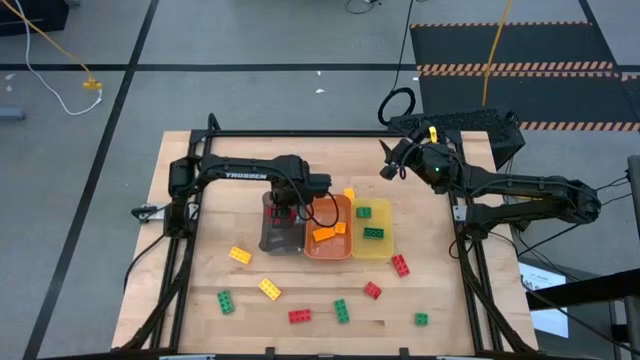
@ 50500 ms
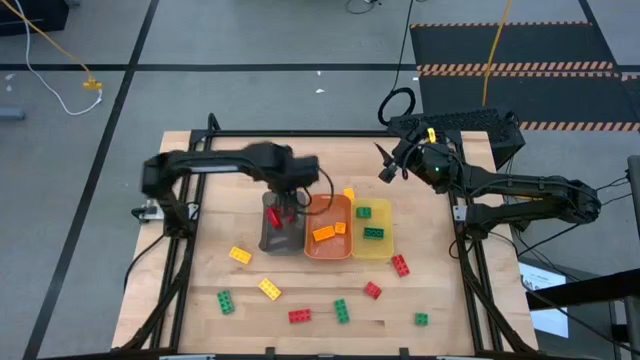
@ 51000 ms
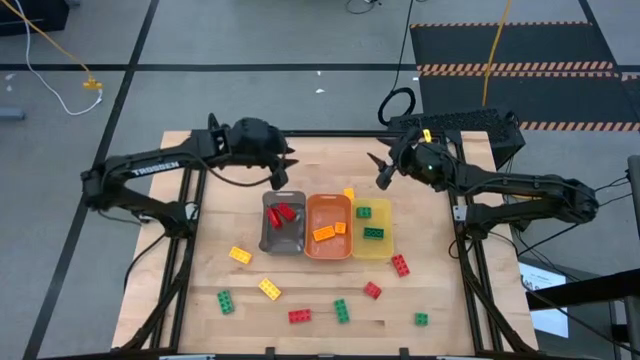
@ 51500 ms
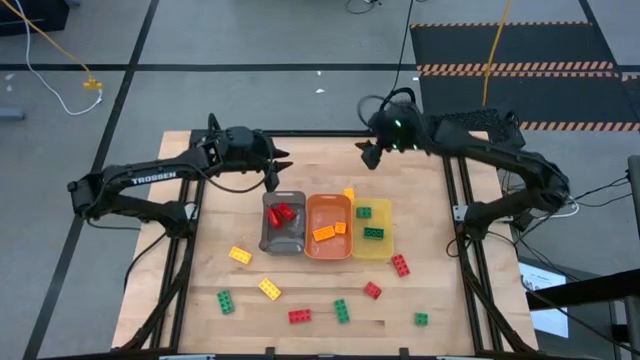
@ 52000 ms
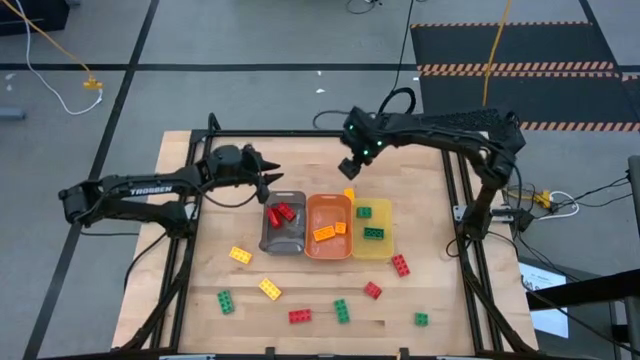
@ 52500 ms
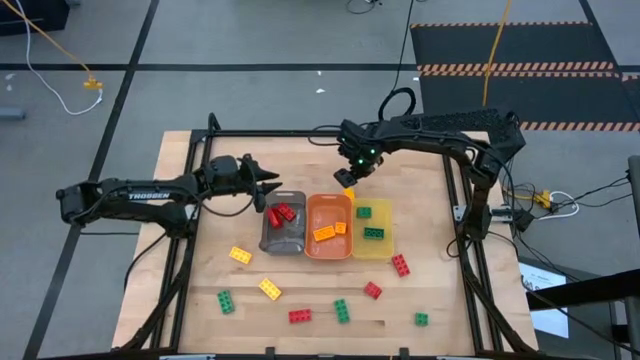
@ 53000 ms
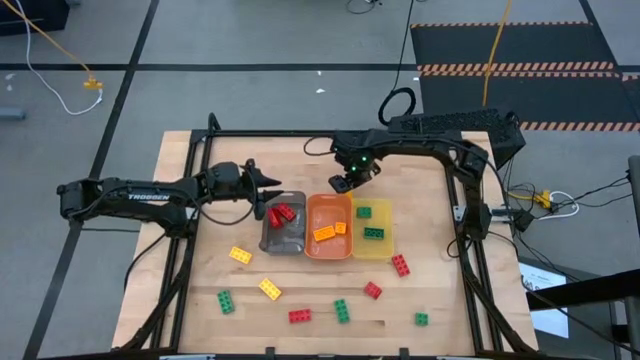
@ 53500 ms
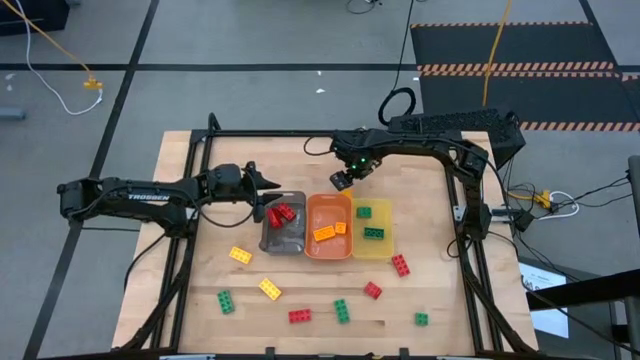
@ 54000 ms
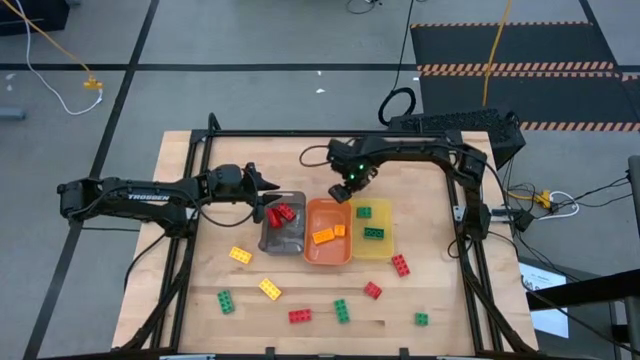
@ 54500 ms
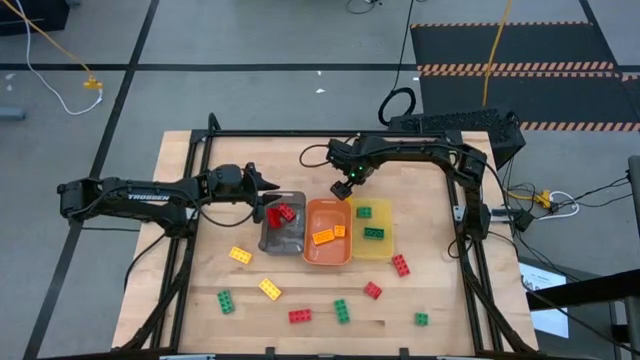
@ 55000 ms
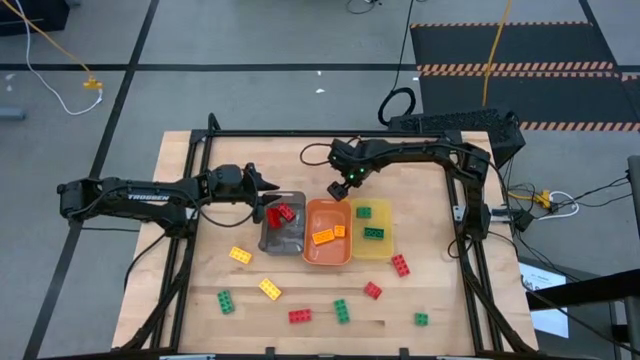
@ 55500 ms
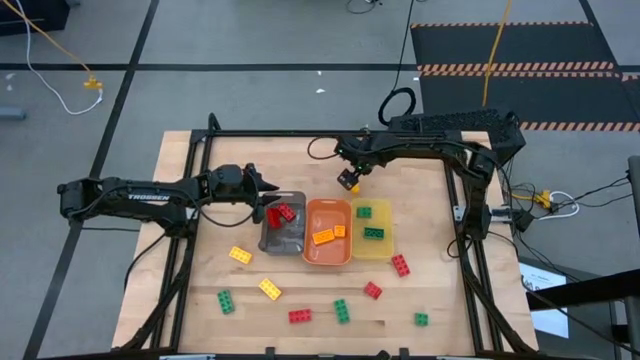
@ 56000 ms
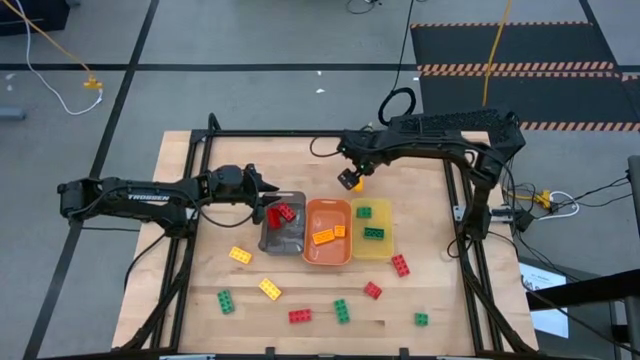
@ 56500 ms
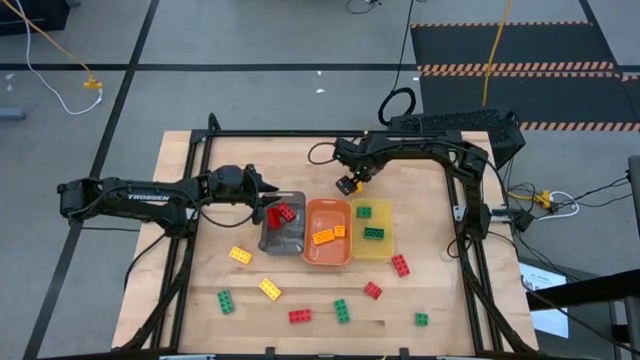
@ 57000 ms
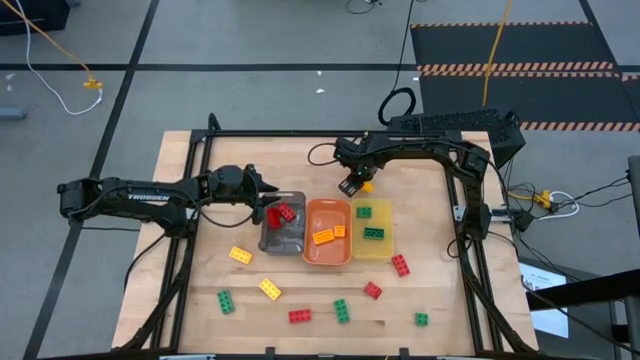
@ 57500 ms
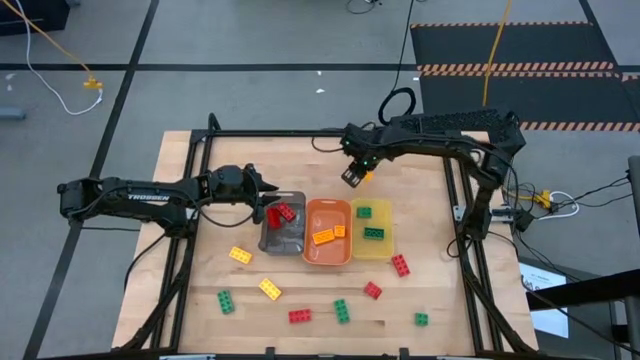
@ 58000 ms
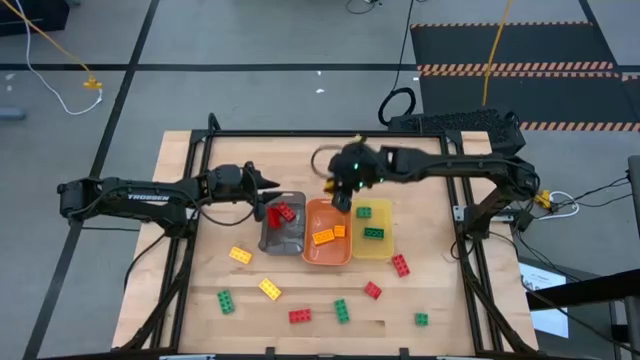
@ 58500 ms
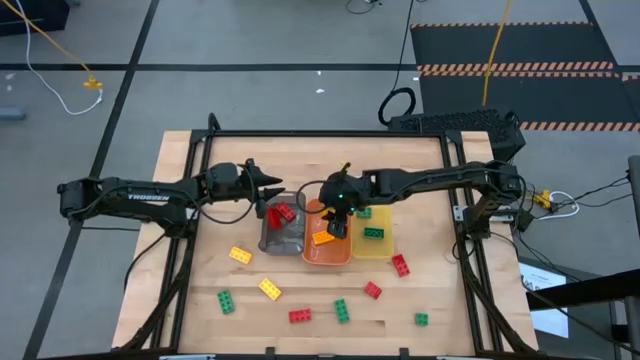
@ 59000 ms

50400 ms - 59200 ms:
Task: Sort & place blocks by color
Put the yellow game piece into the orange bin

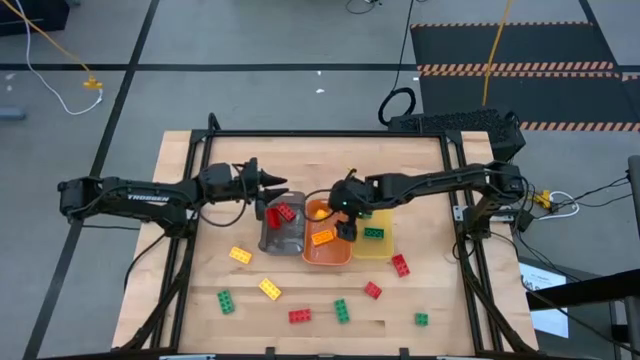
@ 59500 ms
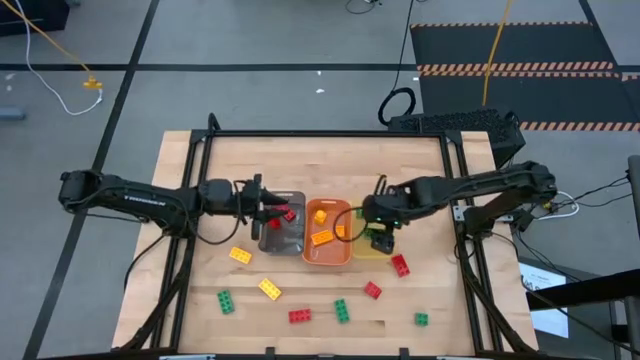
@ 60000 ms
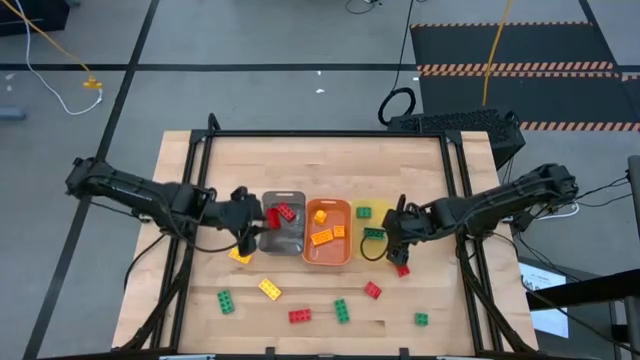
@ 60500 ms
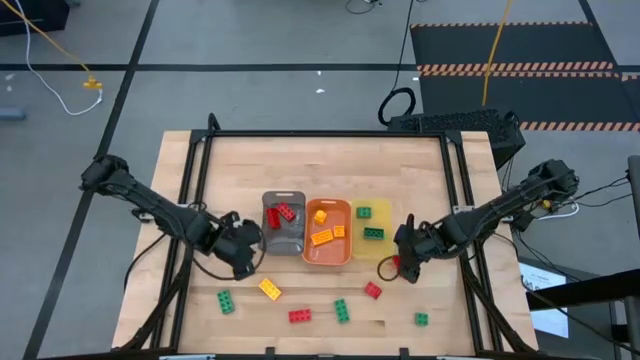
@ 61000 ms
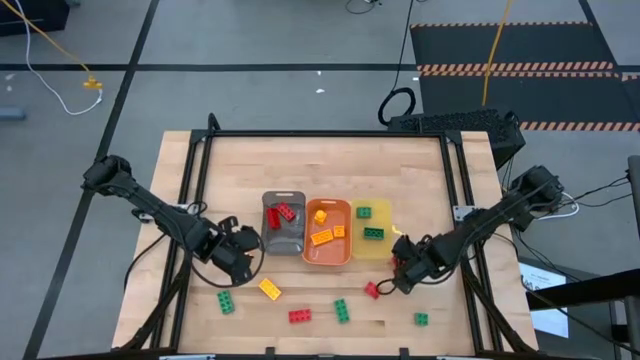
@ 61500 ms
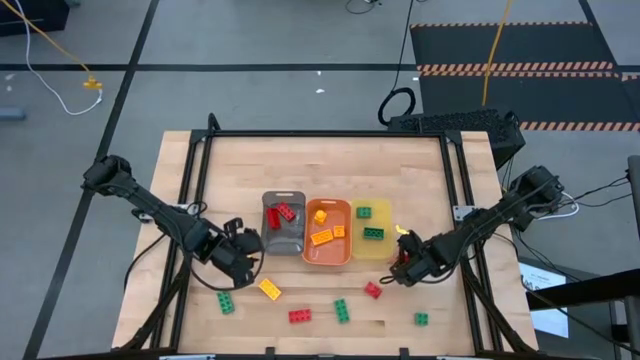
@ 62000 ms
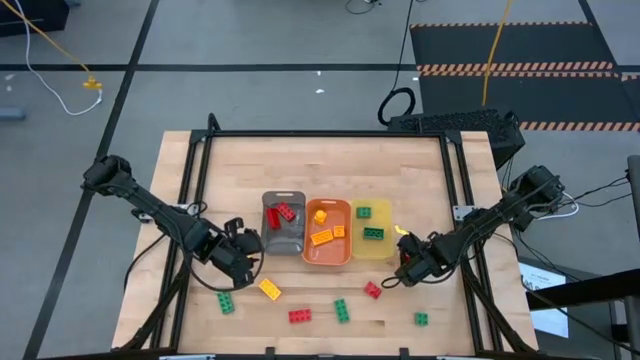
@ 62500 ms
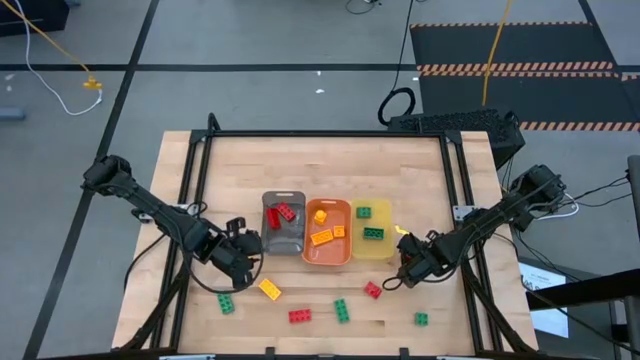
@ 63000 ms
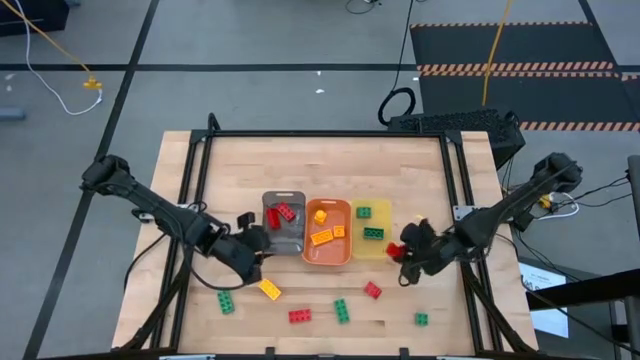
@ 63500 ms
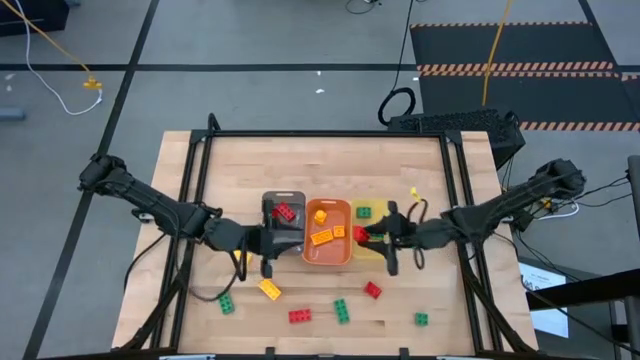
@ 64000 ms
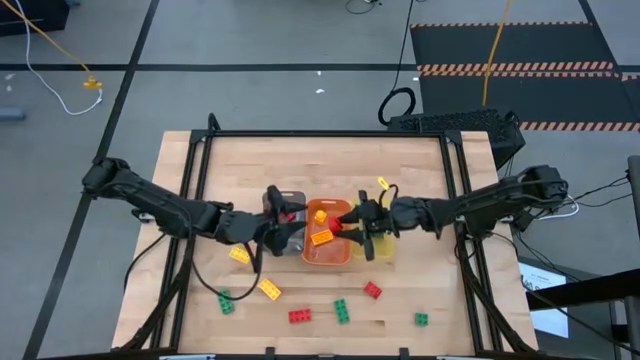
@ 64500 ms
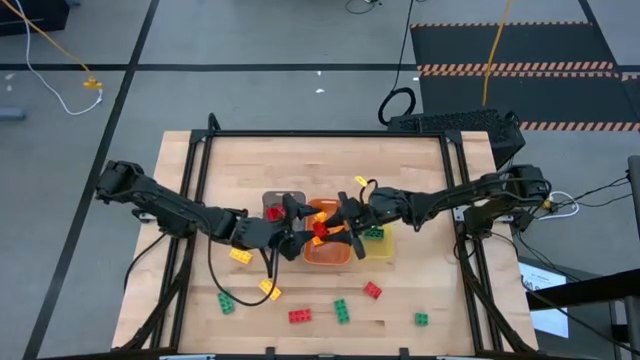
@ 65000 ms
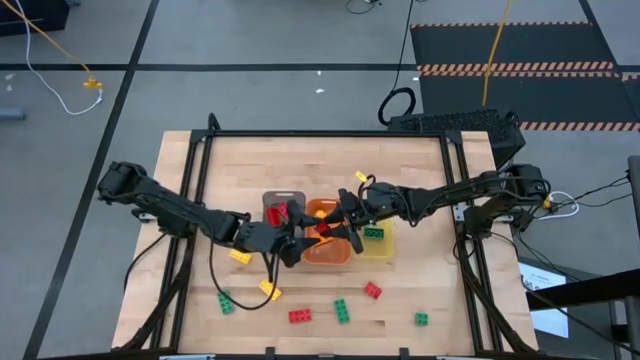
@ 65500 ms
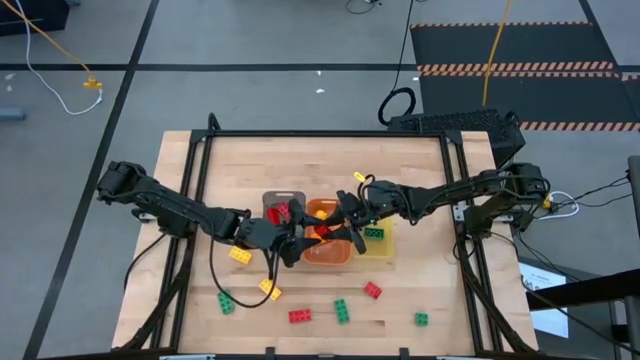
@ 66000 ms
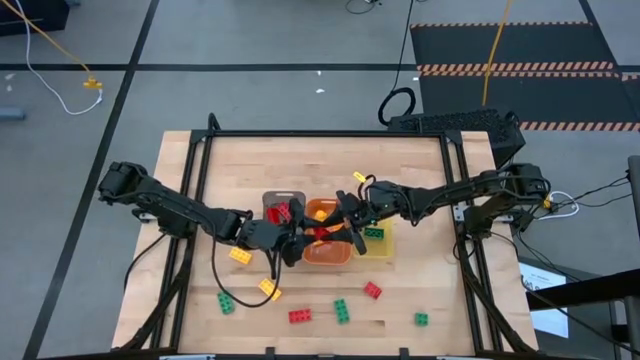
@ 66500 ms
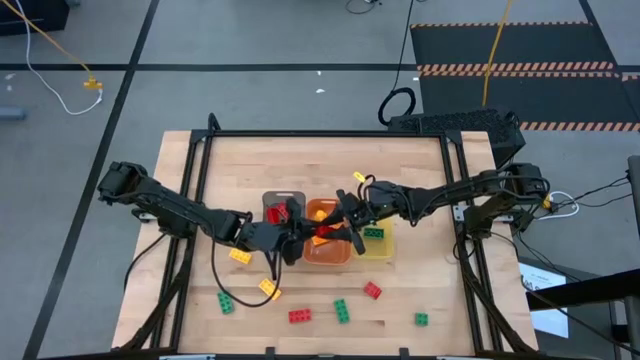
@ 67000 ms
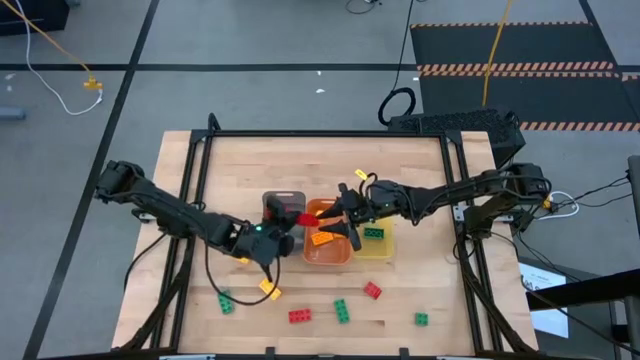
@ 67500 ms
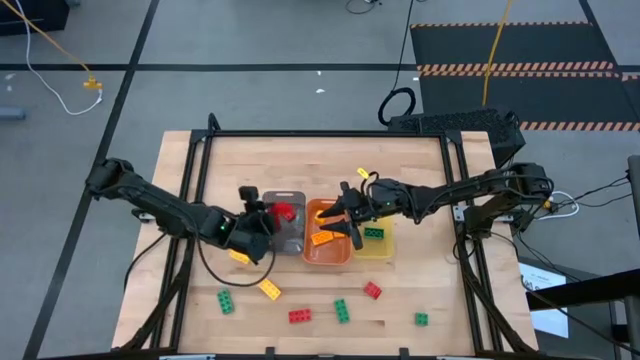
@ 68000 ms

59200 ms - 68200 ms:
Put the red game piece into the black bin

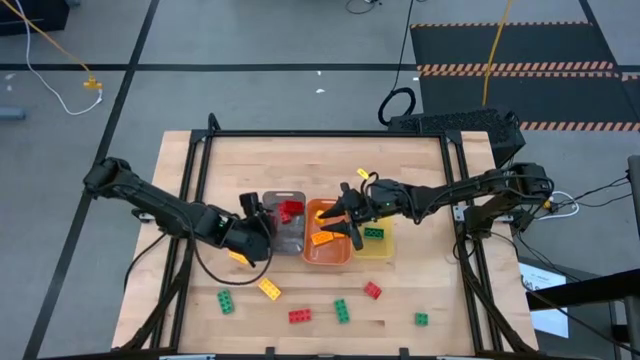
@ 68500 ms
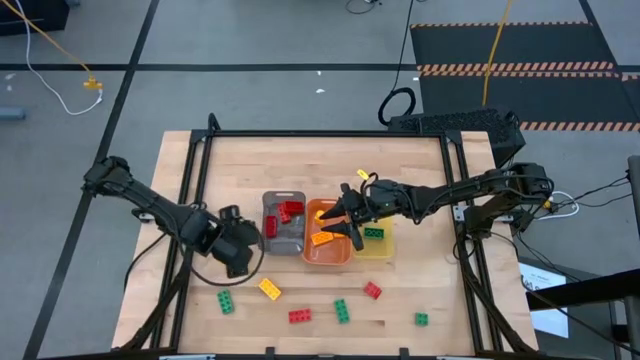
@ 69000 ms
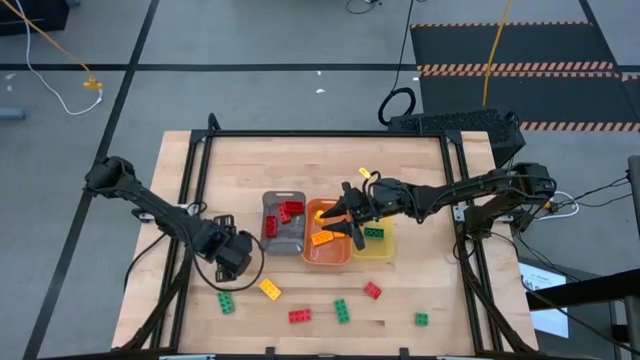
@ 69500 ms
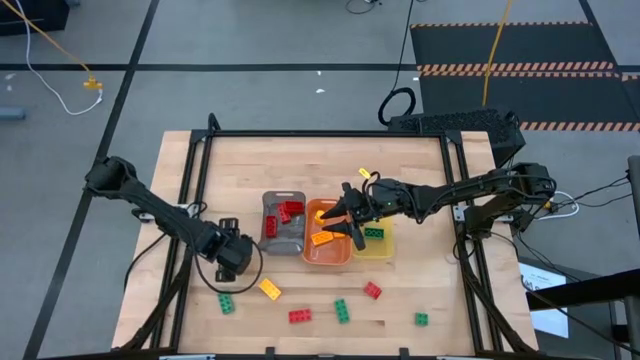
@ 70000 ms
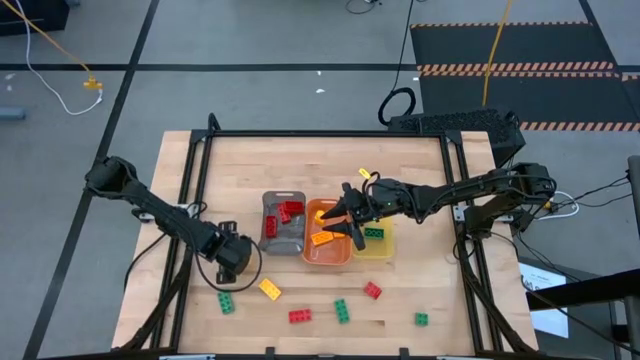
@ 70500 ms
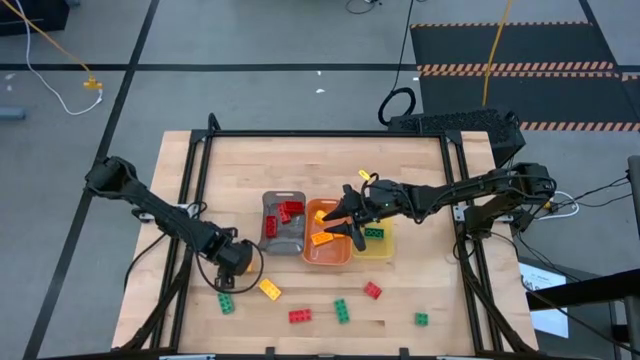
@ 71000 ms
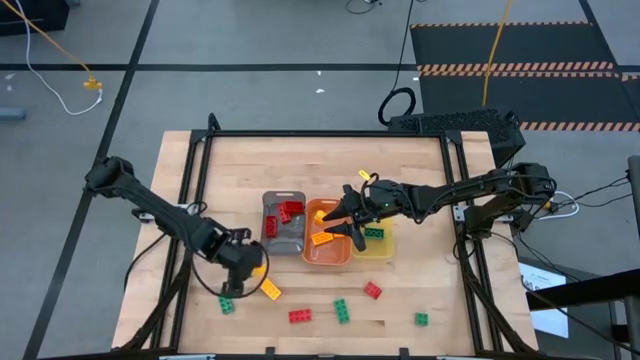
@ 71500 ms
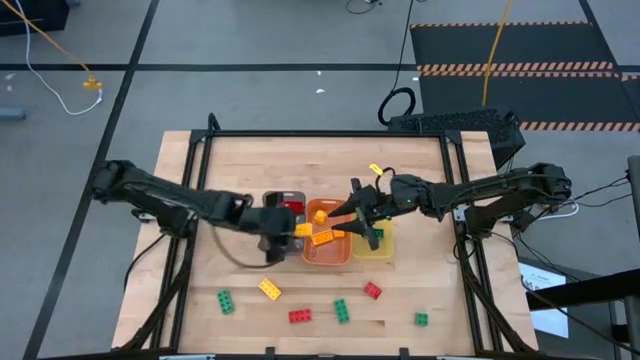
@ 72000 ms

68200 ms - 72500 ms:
Put the yellow game piece into the orange bin

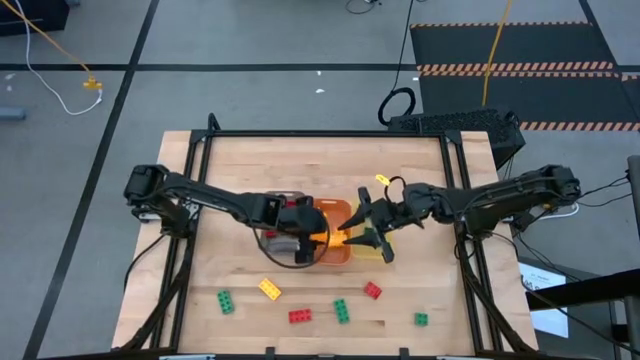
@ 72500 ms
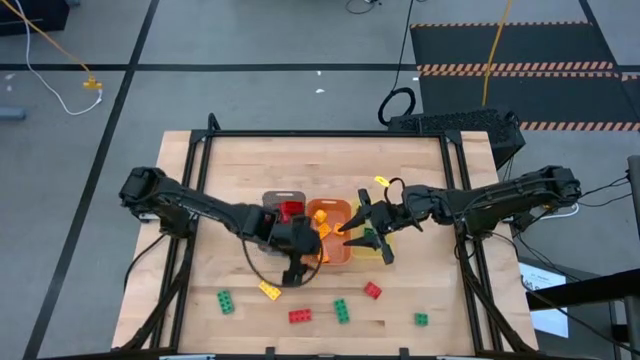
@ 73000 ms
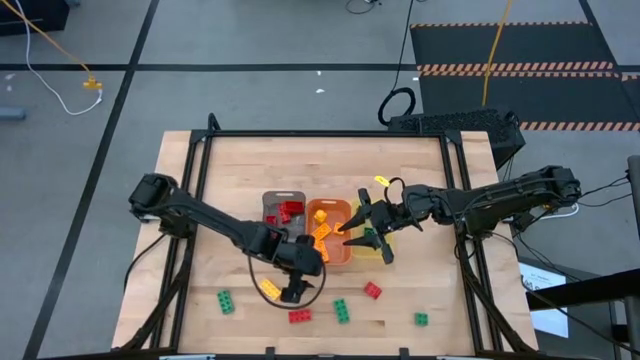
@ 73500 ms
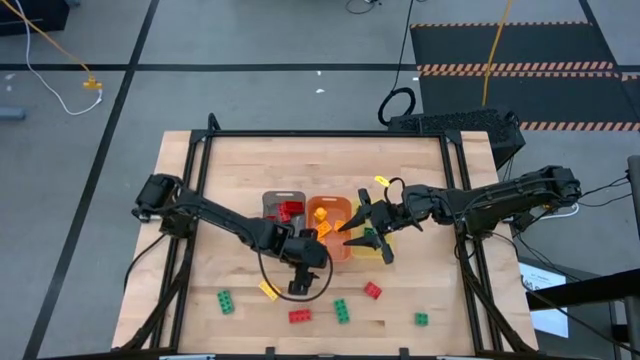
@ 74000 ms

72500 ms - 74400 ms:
Adjust the orange bin on the table
